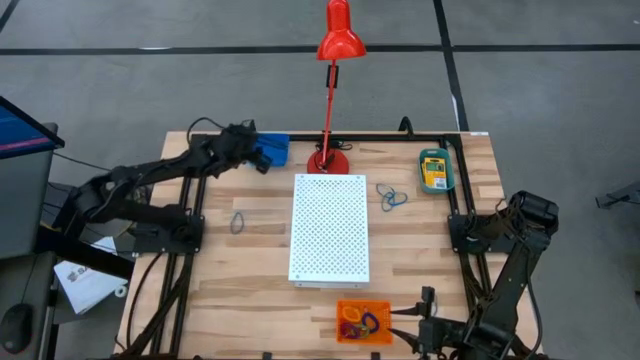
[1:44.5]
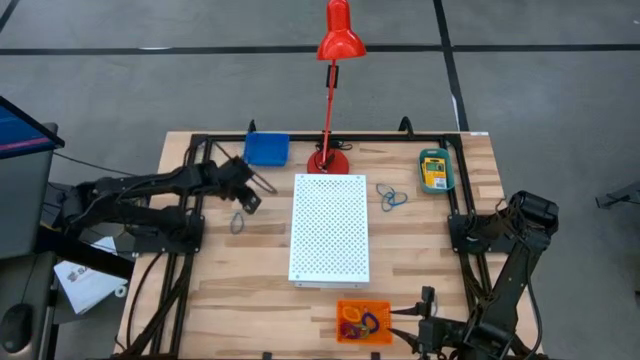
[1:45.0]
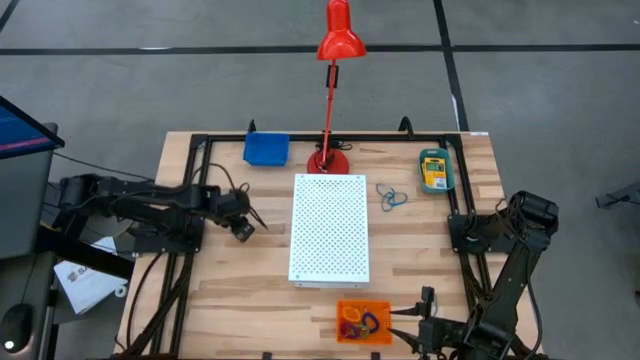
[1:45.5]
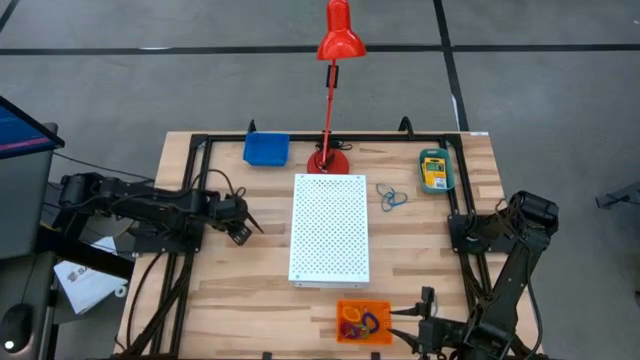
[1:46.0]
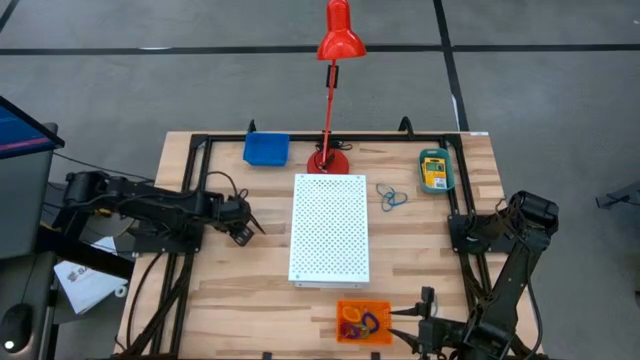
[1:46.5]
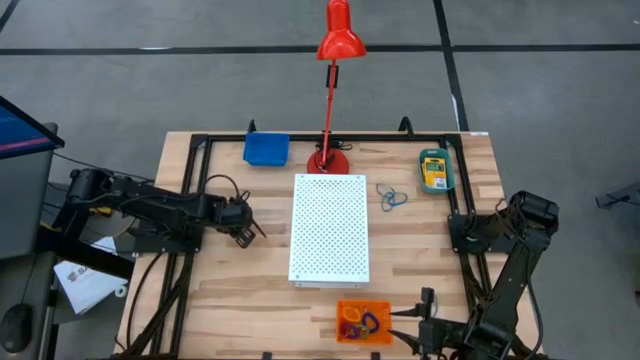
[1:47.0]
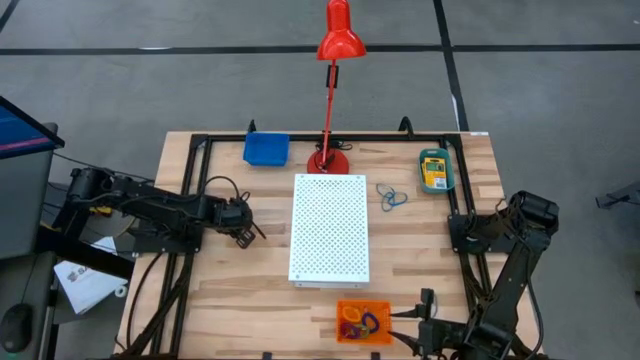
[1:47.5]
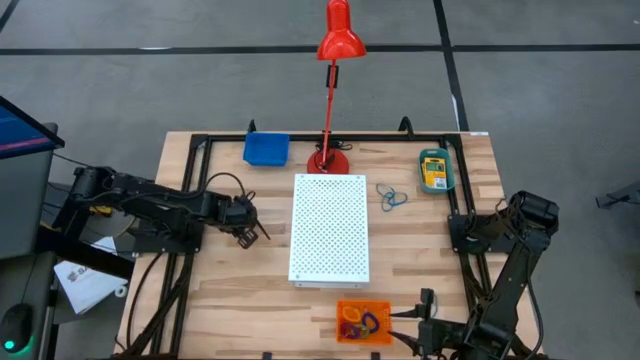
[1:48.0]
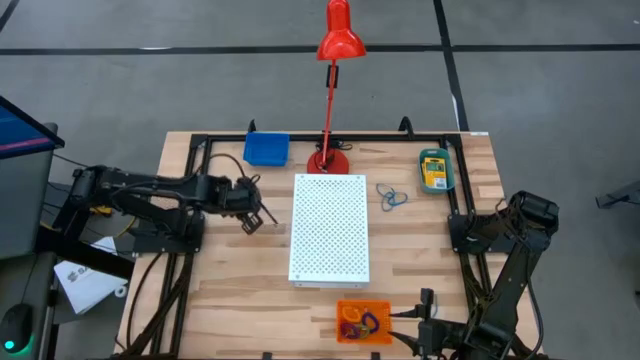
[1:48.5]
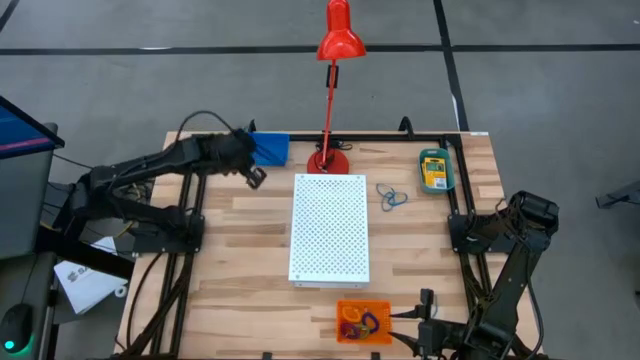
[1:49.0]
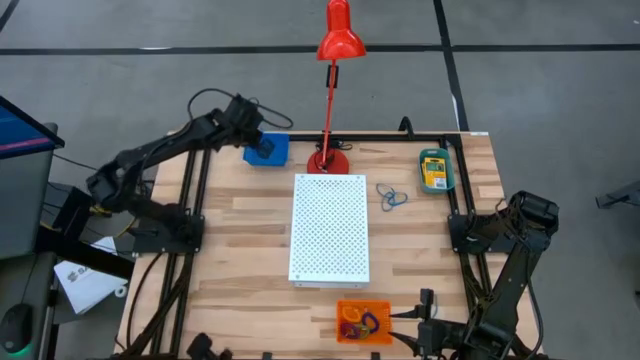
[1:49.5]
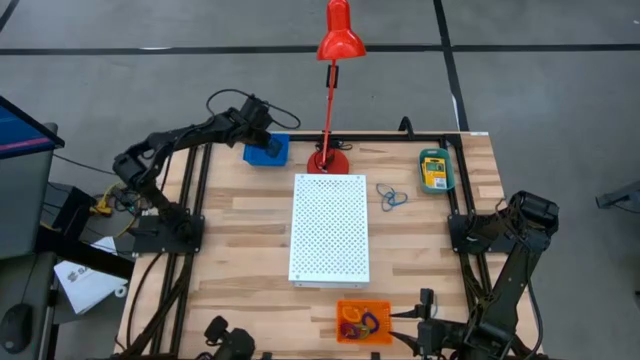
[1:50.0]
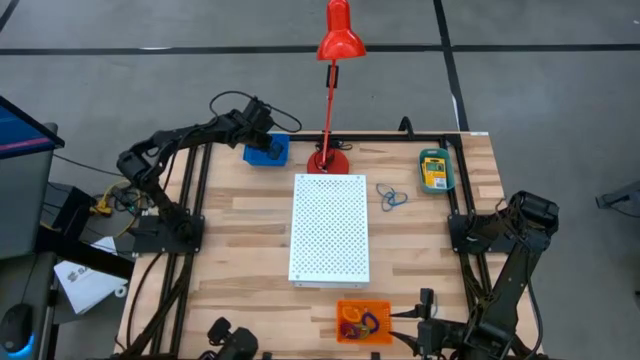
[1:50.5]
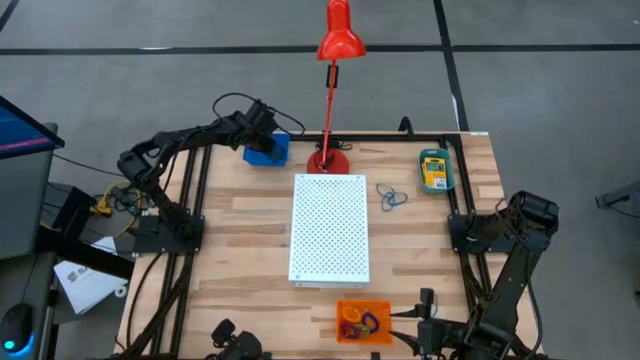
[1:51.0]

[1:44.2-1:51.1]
Task: Pick & Place Office Desk Supplies
Put the blue rubber band into the blue bin

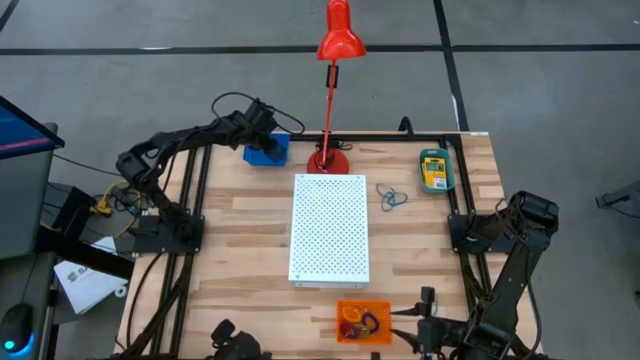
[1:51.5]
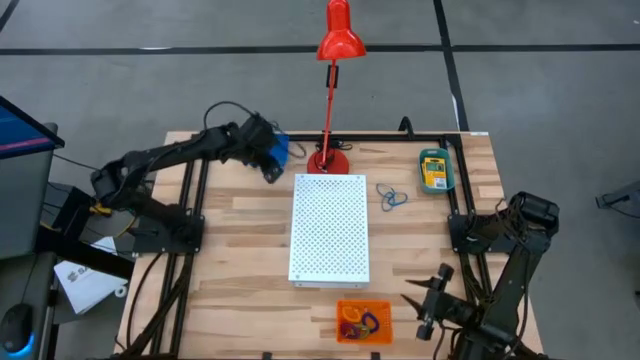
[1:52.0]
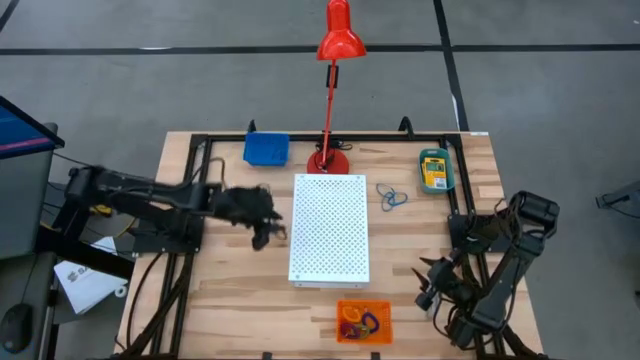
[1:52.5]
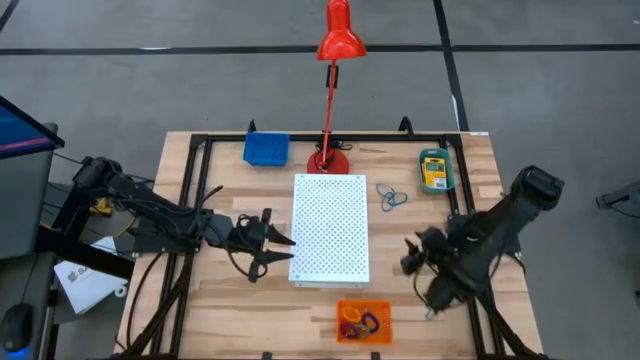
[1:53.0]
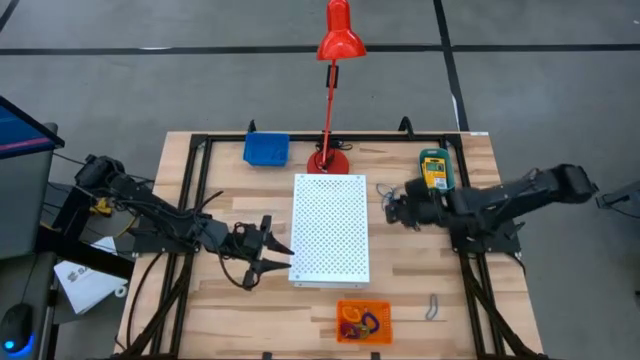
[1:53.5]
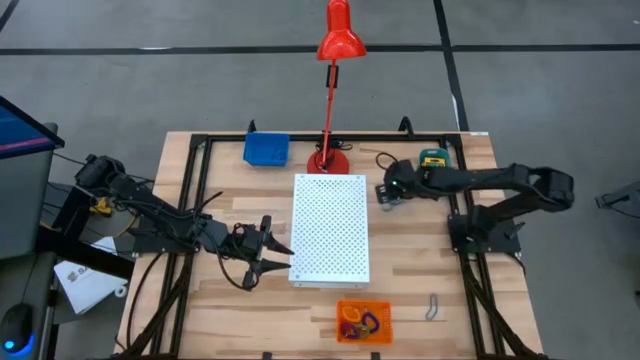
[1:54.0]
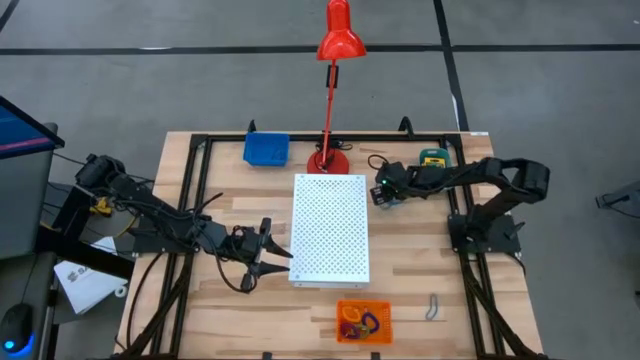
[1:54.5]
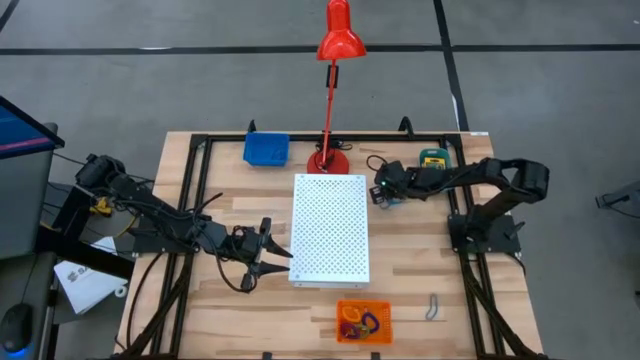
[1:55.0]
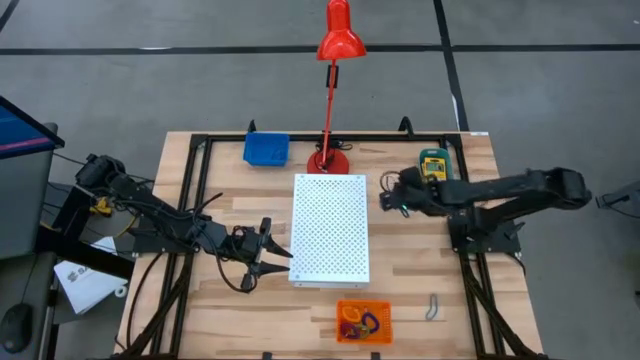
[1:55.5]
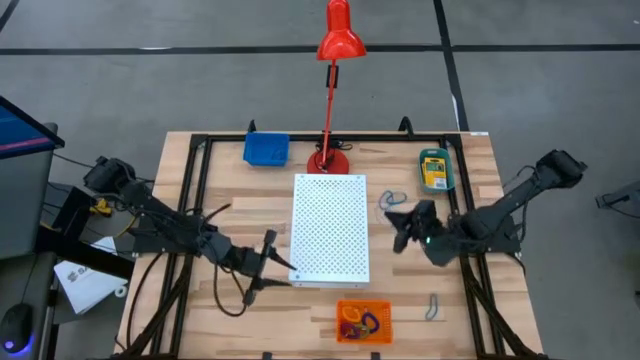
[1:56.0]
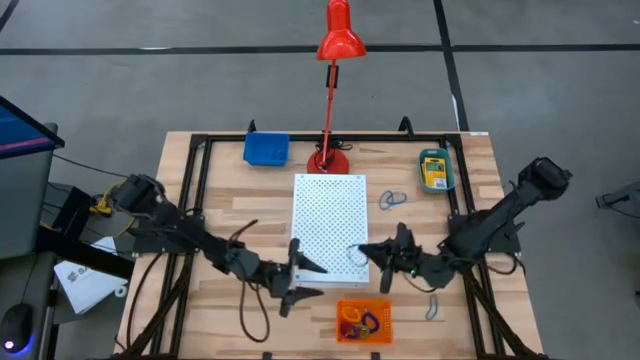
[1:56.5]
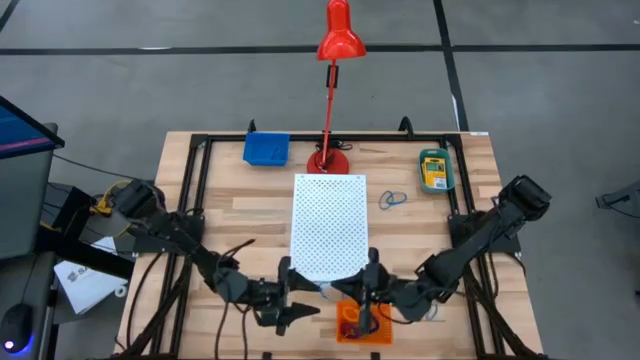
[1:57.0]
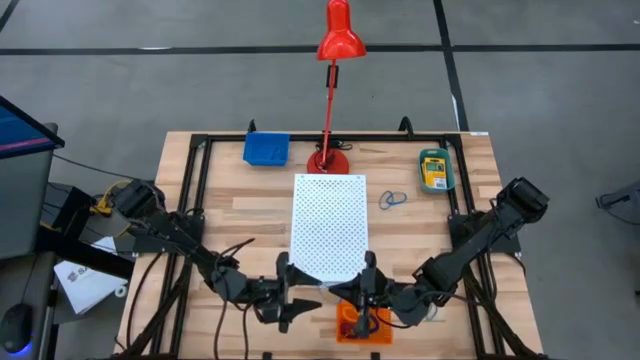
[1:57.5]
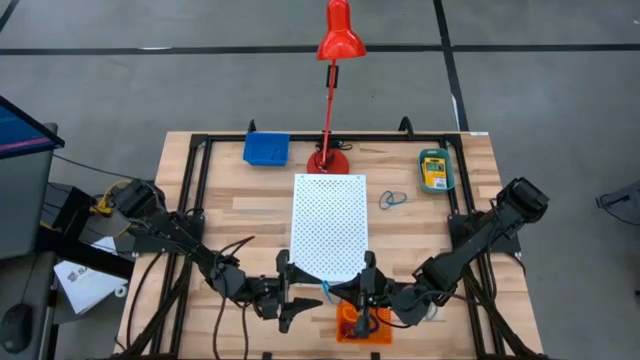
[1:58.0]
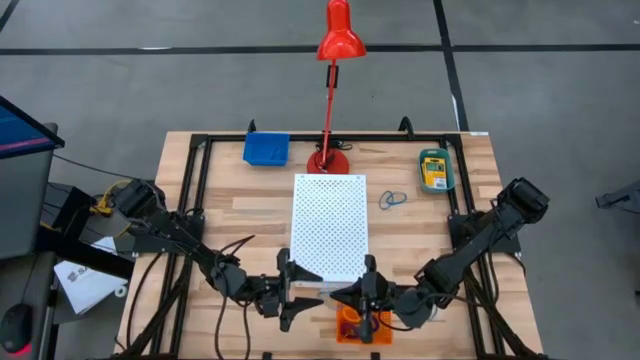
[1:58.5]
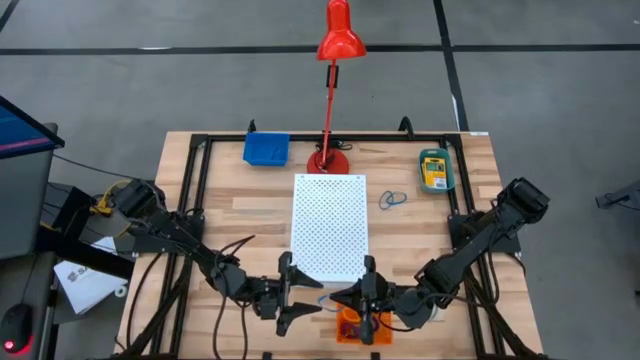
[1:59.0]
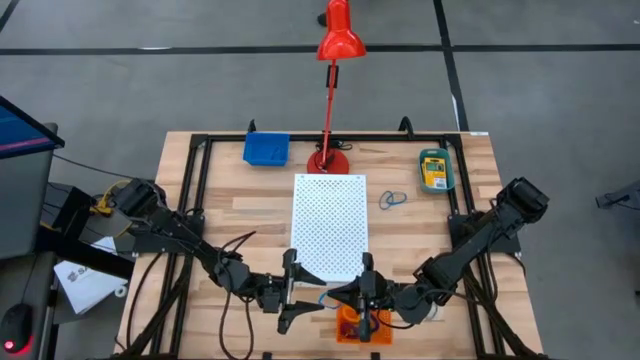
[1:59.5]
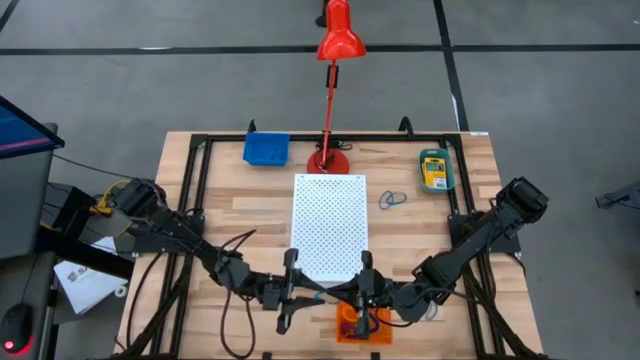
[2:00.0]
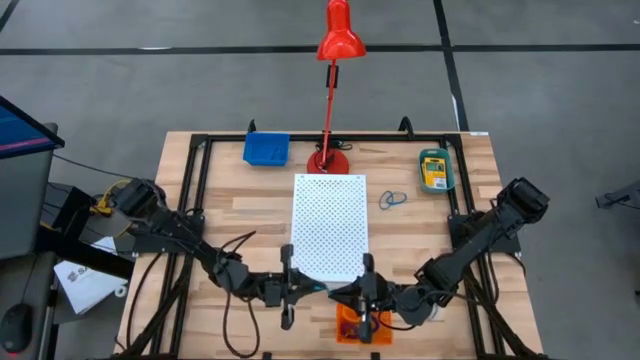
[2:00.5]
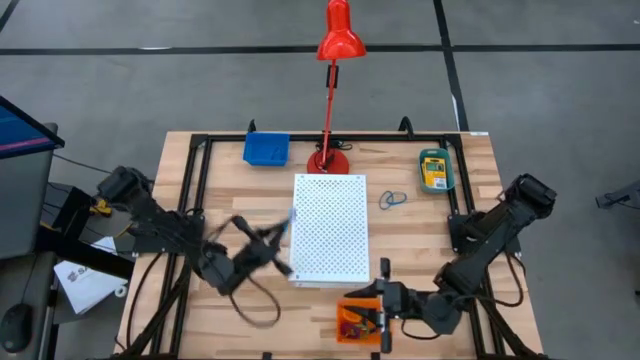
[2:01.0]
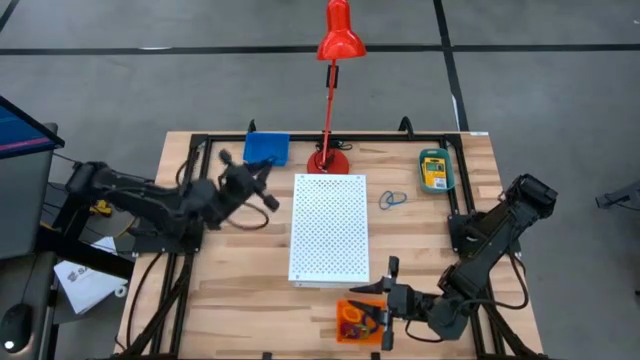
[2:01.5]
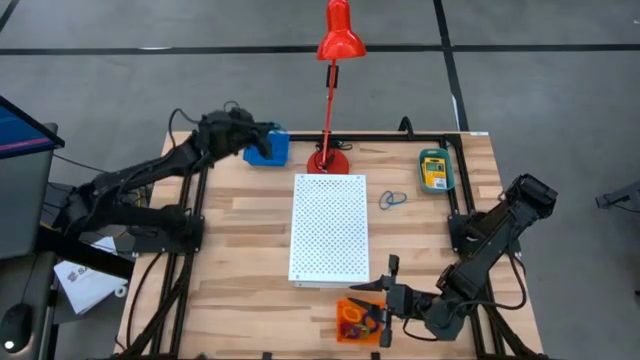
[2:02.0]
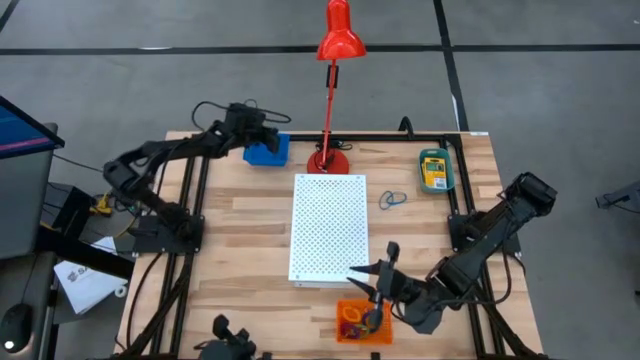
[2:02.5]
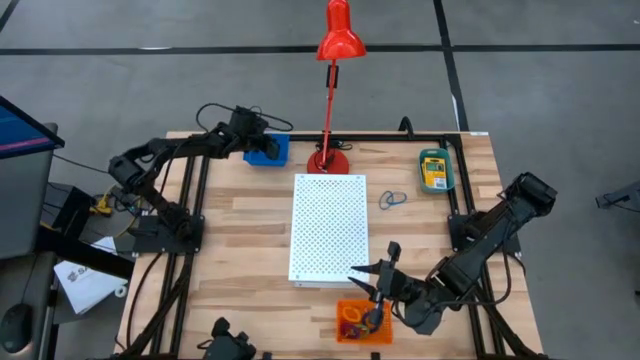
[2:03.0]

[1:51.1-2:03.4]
Put the blue rubber band into the blue bin

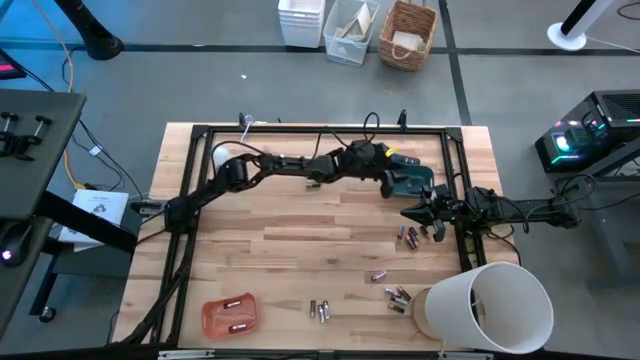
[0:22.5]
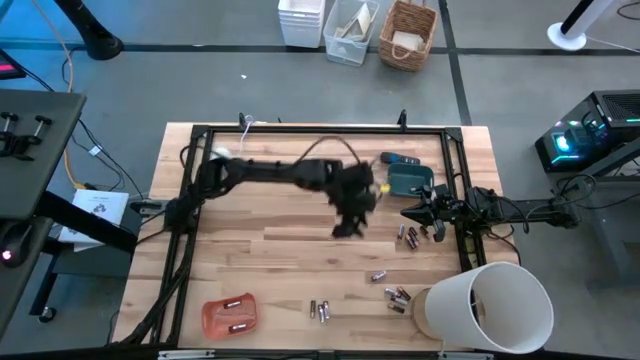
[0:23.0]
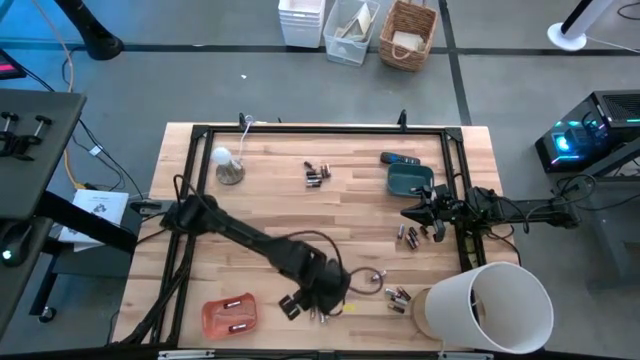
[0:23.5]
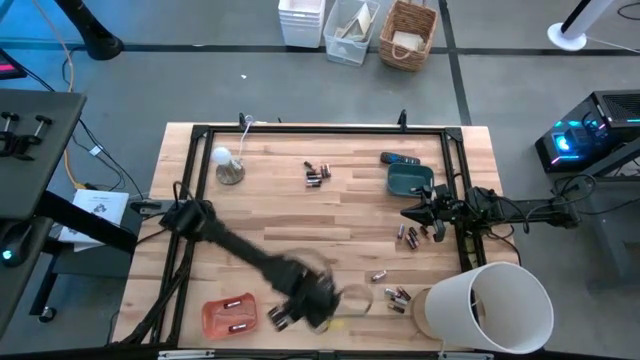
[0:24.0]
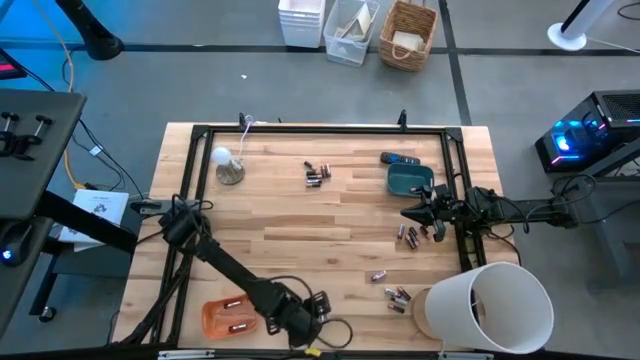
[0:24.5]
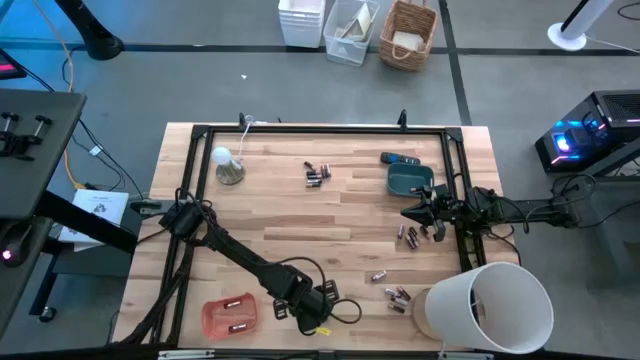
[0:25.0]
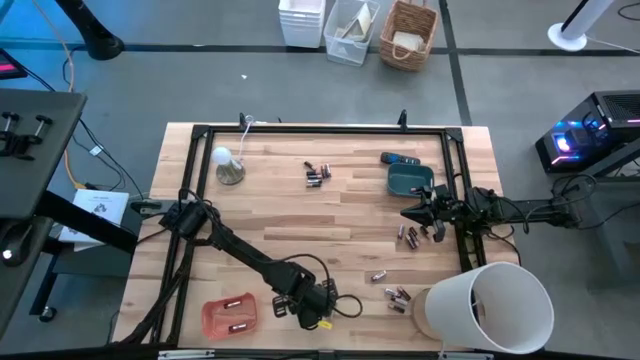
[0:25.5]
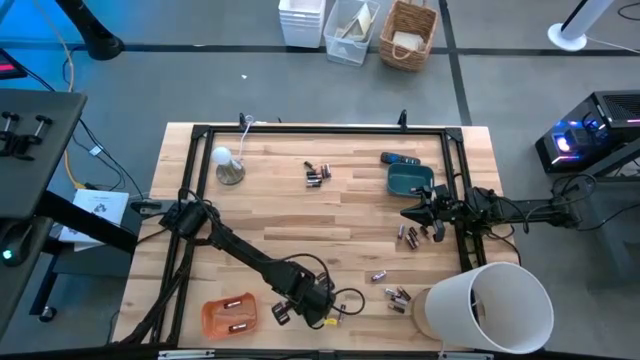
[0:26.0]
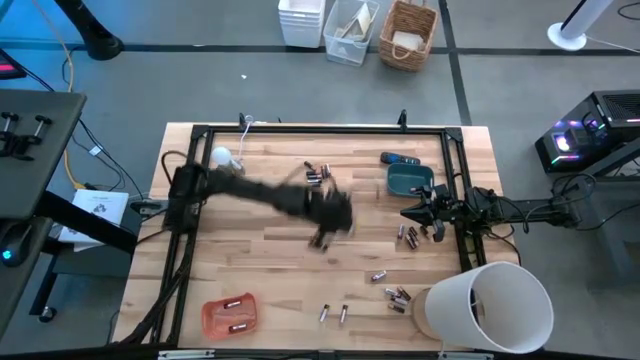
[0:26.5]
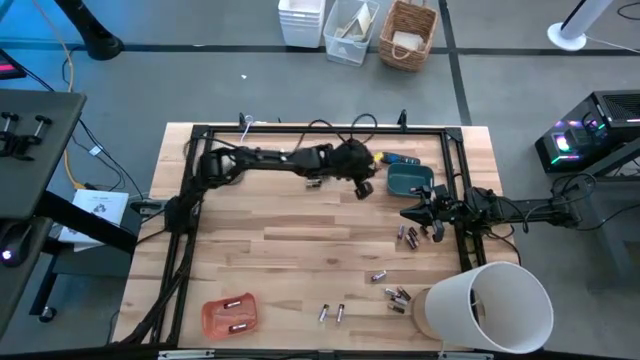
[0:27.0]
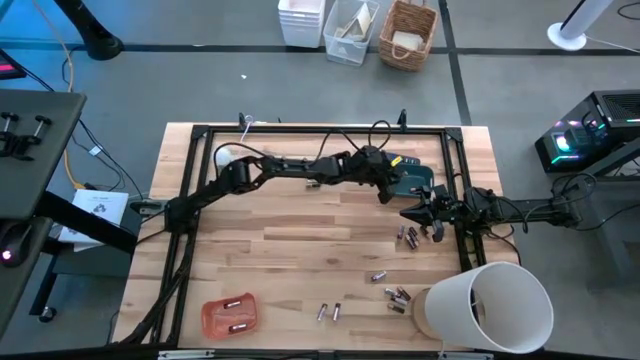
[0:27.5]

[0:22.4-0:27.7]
Task: Sort batteries
Put the black battery into the blue bin
